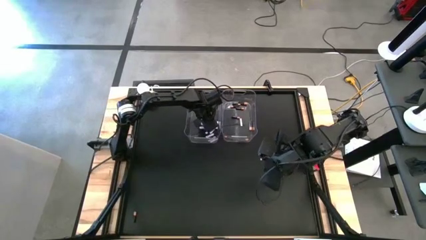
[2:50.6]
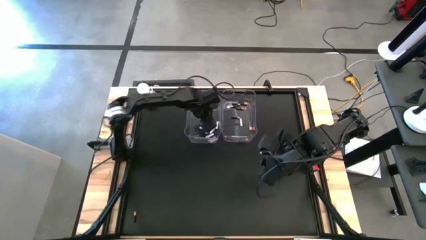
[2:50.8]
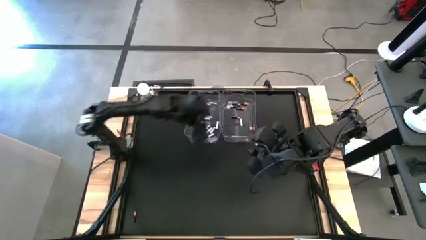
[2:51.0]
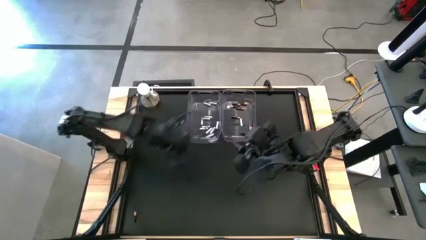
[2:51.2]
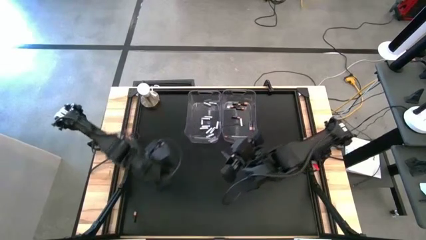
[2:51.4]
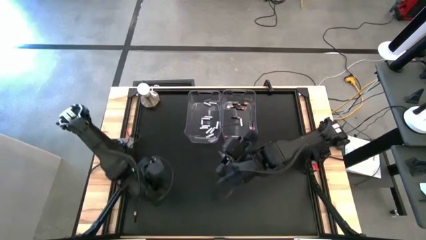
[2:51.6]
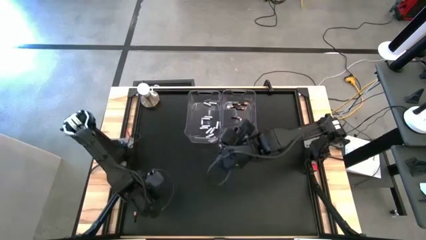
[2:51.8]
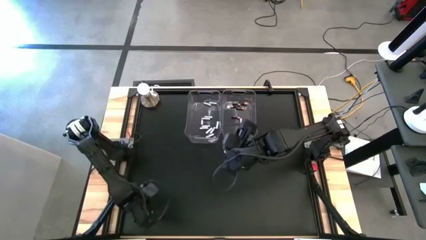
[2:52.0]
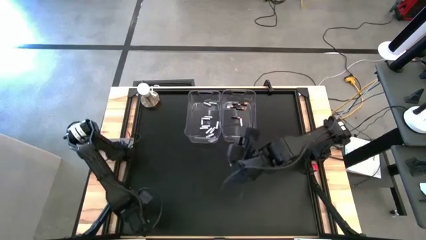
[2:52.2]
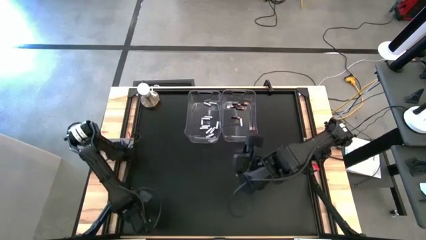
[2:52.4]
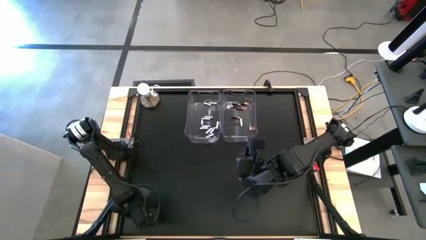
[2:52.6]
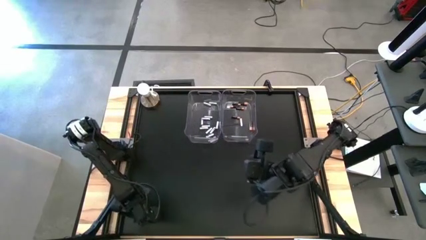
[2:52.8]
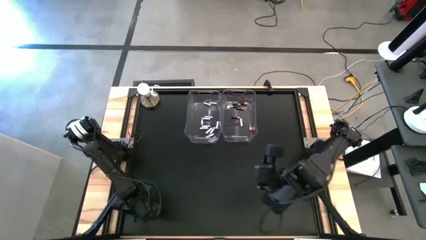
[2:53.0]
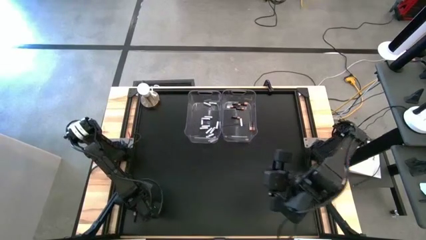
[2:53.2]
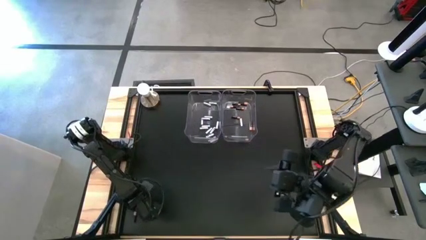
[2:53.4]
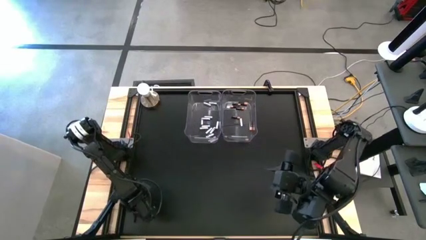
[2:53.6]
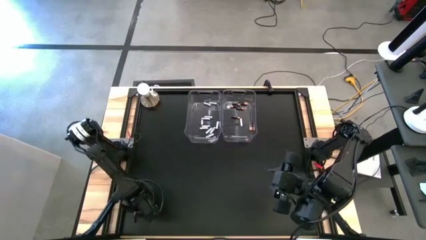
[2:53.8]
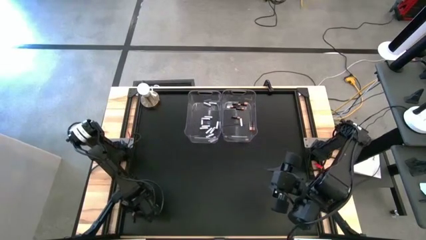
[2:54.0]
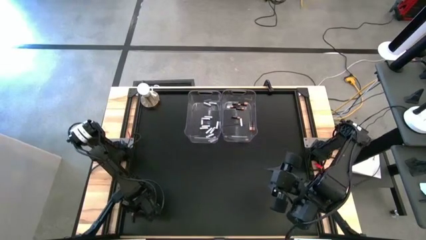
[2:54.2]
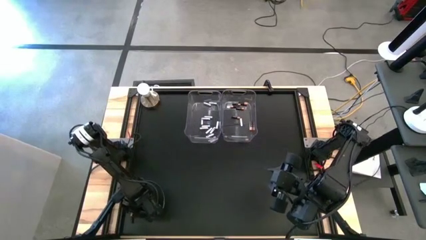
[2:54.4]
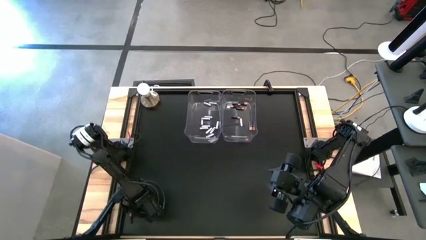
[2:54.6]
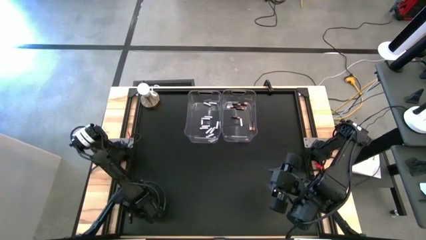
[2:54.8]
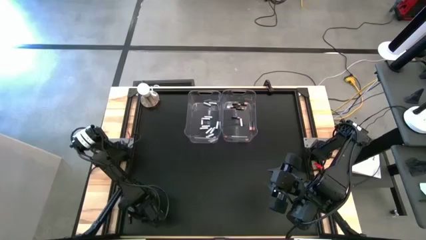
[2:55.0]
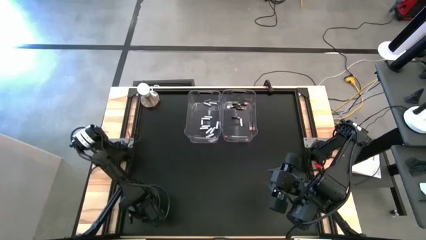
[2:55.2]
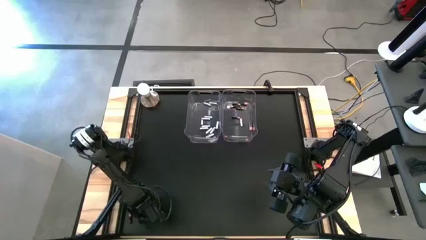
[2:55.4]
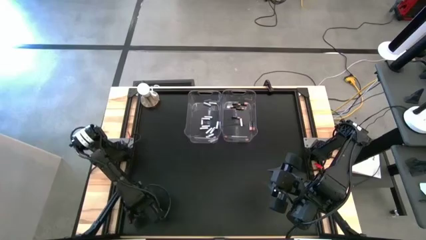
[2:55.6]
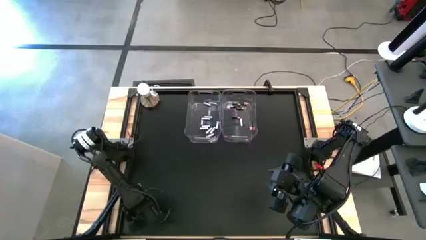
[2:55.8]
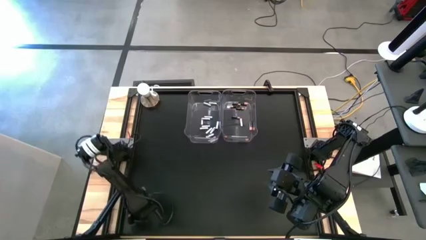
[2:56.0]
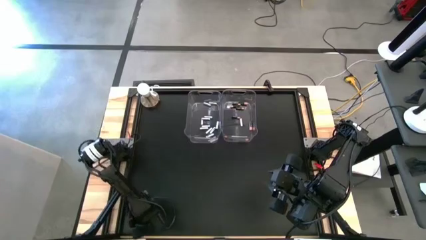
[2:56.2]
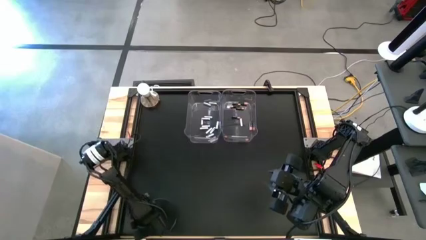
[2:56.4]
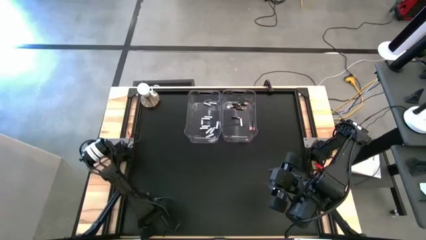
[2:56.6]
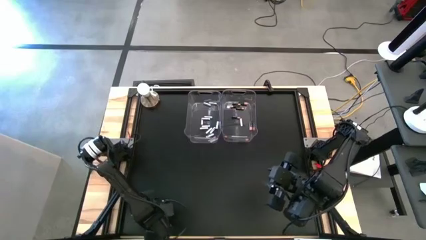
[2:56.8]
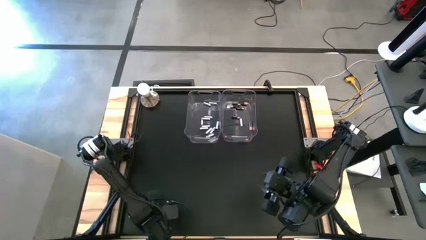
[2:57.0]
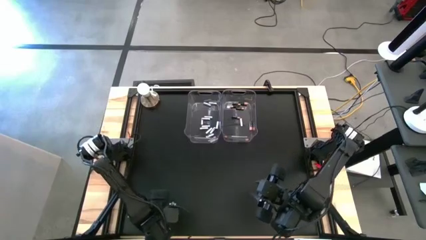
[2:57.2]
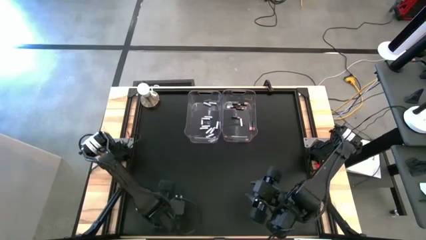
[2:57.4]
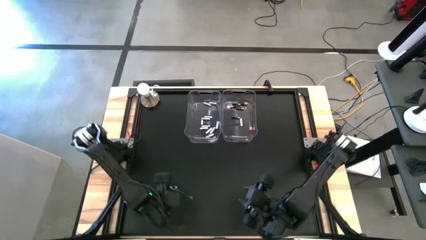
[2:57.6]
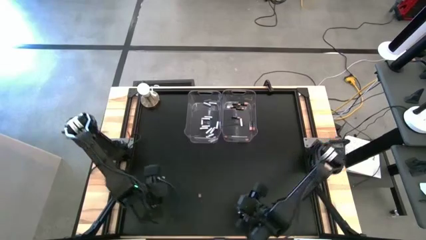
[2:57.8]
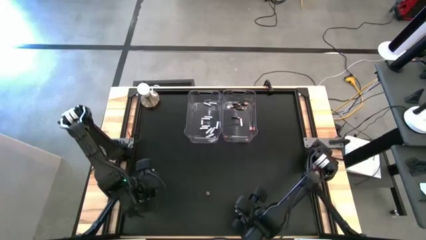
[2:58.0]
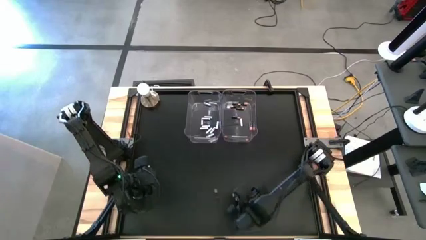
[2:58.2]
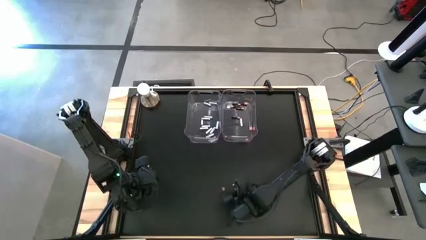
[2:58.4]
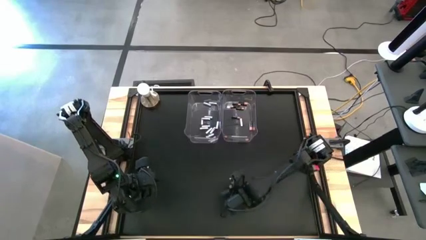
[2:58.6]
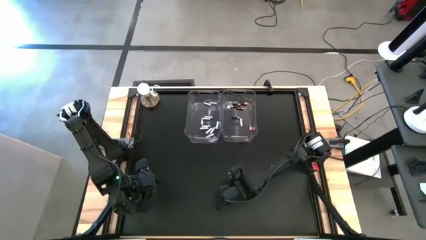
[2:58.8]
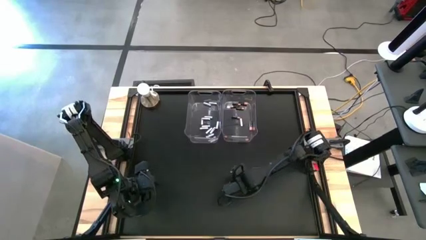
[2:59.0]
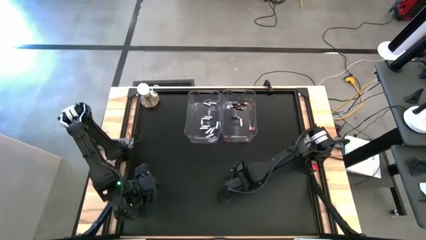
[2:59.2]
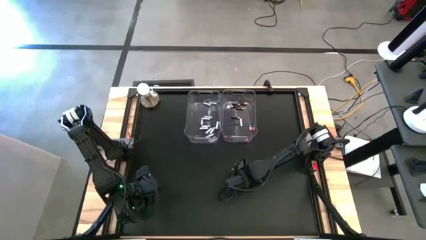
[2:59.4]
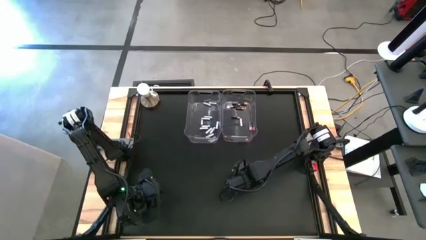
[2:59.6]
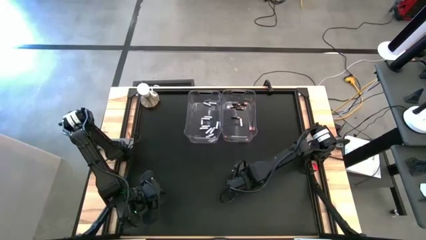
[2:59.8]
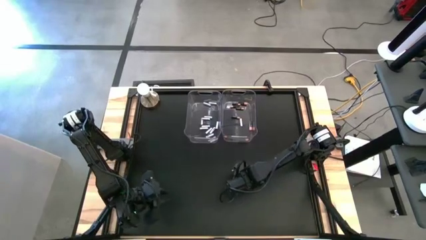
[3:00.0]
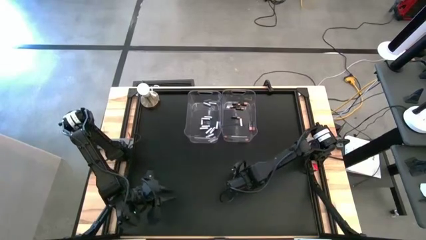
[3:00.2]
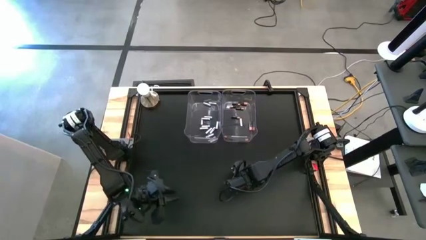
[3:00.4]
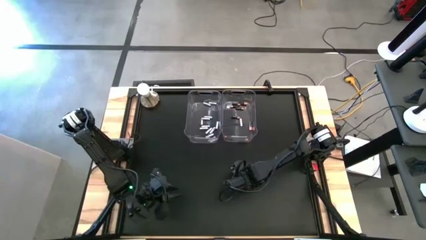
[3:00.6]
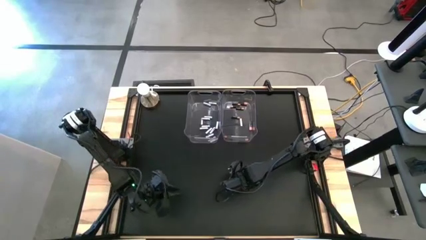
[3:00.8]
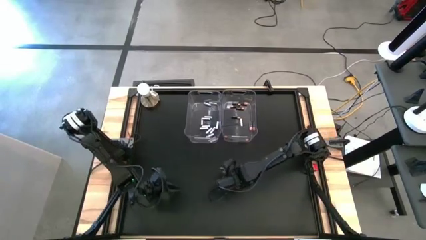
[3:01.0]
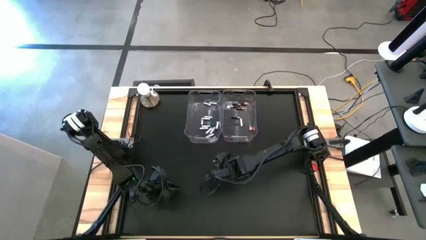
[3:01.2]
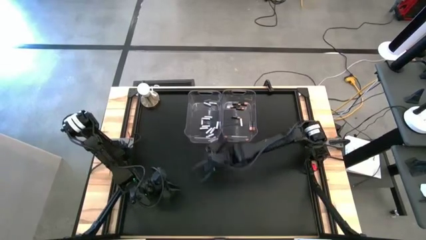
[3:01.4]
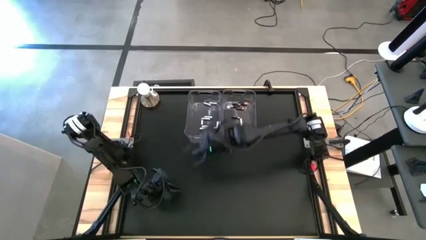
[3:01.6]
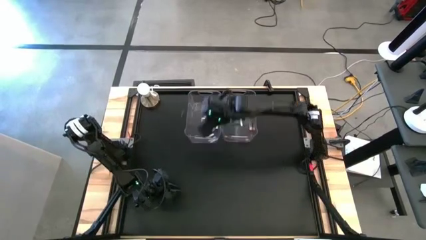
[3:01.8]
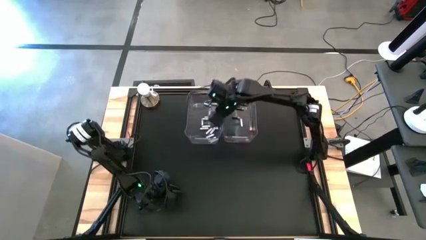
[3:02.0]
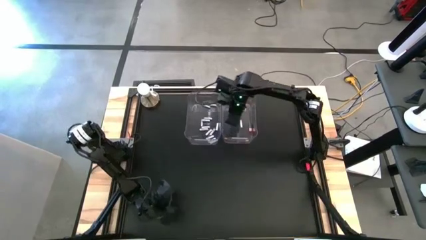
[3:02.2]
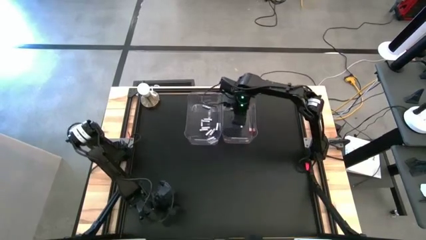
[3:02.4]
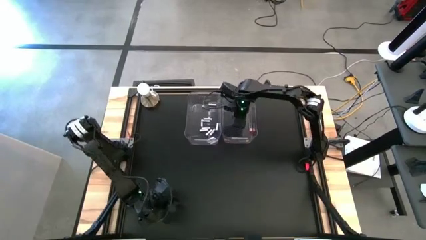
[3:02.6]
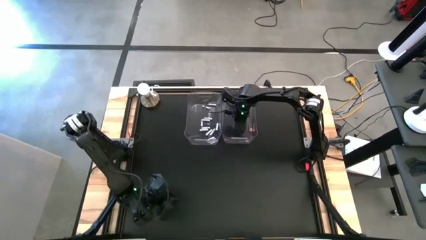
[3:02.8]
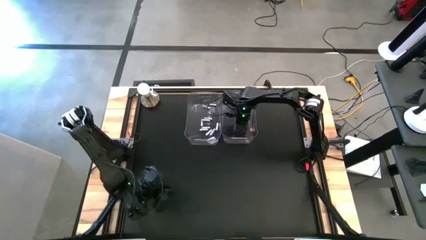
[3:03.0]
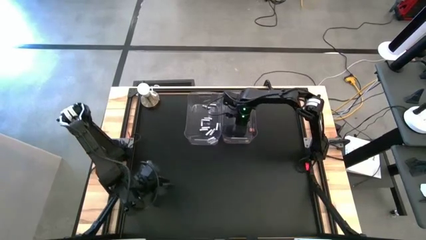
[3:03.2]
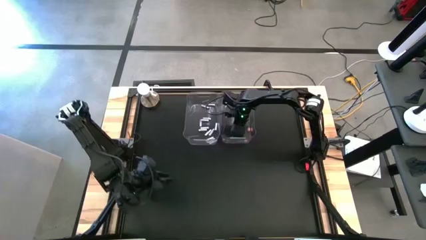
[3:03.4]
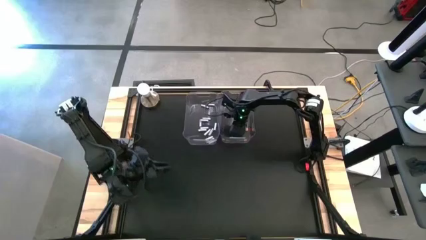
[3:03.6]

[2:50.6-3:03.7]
Task: Sort batteries
Put the brown battery into the right transparent bin
